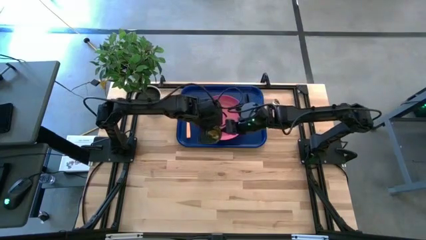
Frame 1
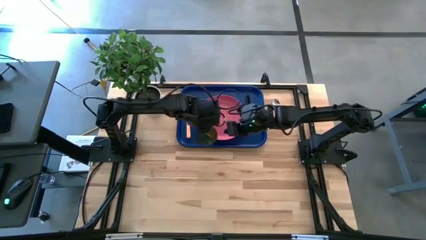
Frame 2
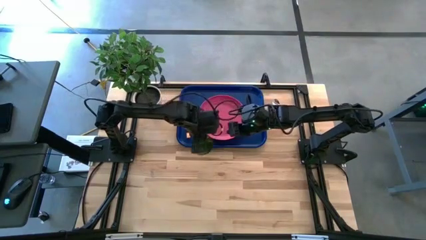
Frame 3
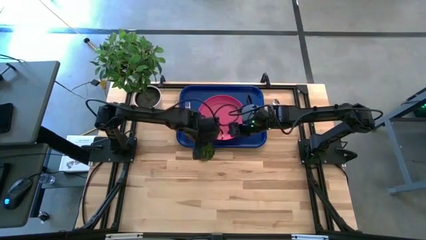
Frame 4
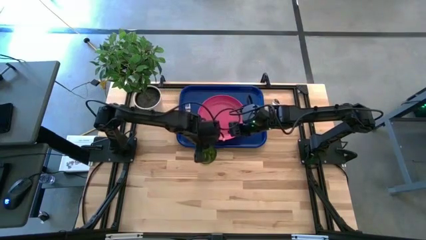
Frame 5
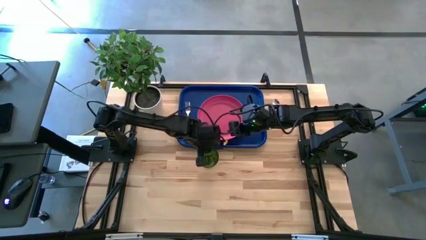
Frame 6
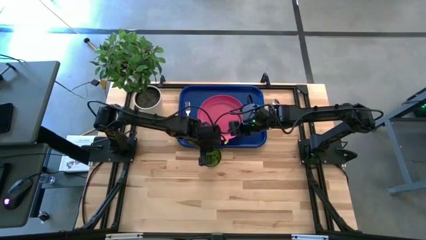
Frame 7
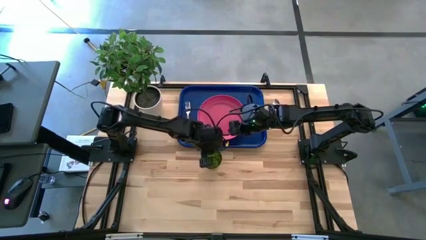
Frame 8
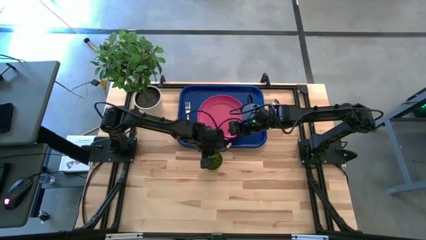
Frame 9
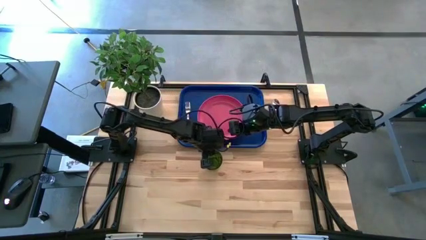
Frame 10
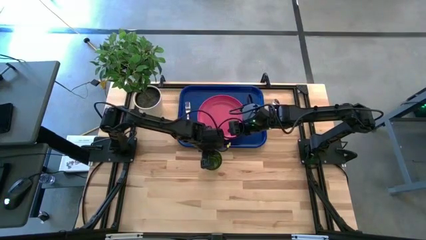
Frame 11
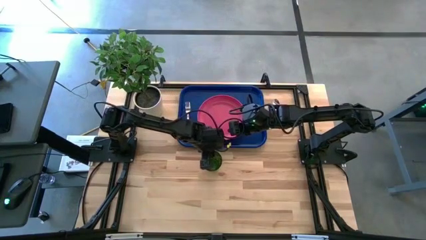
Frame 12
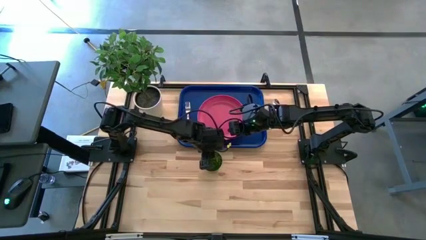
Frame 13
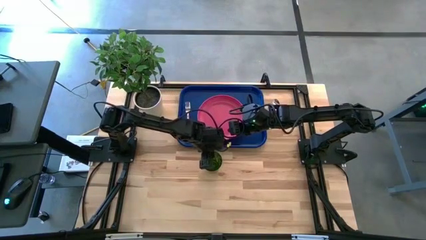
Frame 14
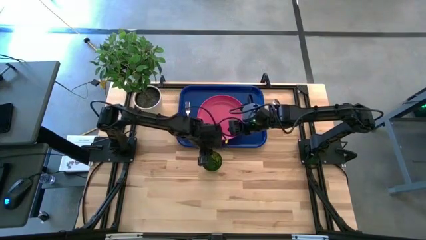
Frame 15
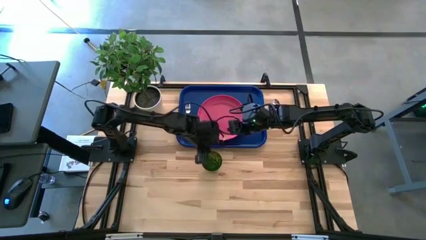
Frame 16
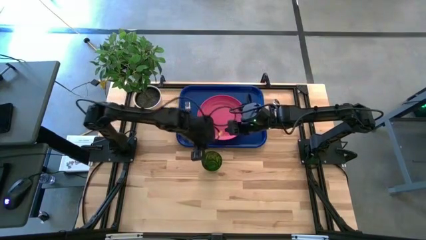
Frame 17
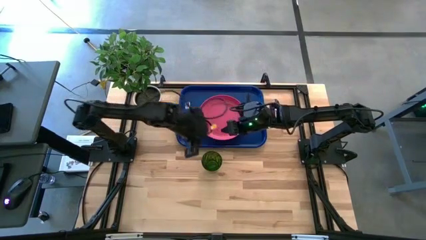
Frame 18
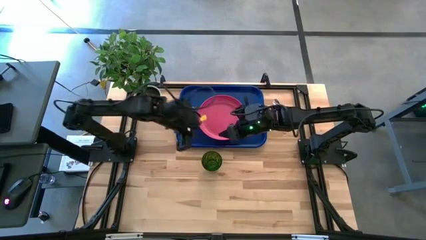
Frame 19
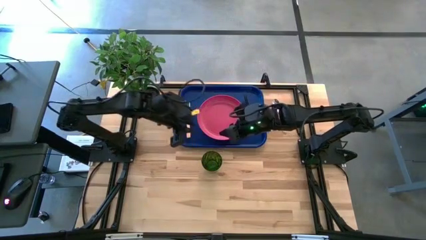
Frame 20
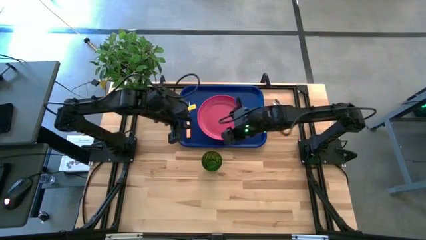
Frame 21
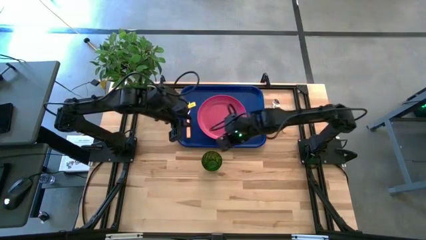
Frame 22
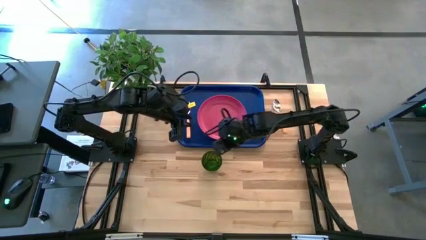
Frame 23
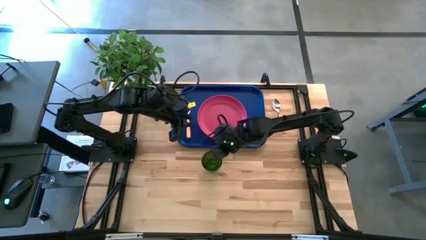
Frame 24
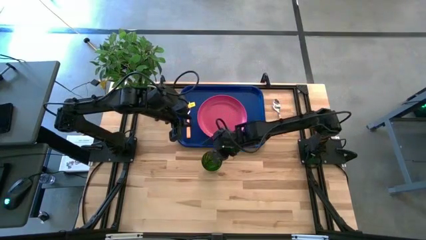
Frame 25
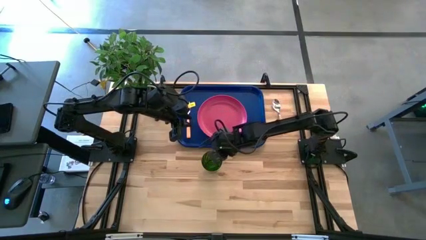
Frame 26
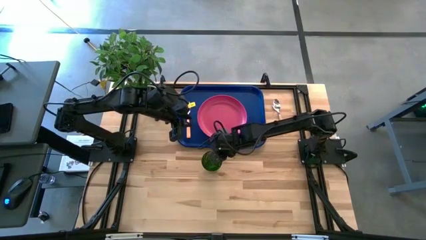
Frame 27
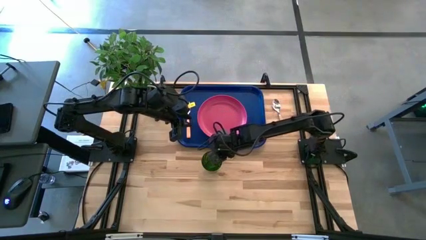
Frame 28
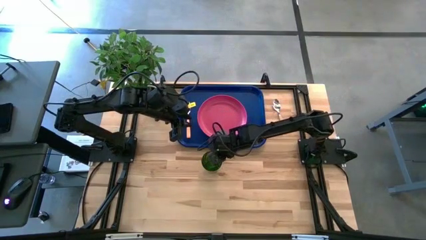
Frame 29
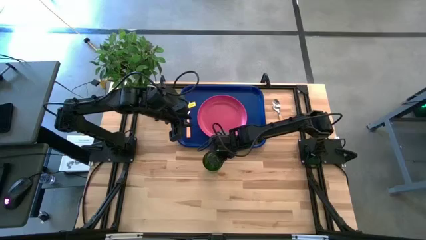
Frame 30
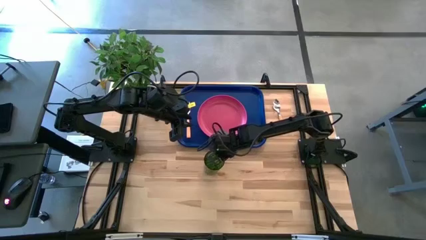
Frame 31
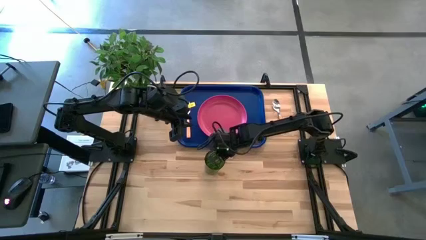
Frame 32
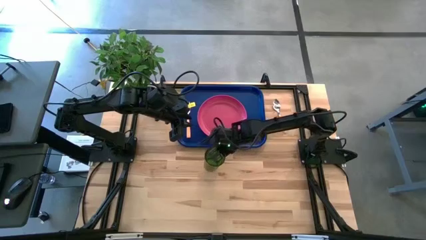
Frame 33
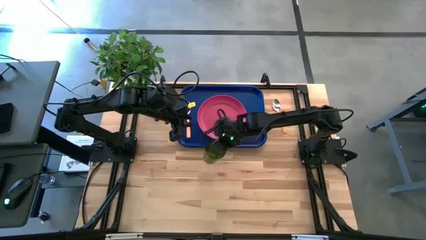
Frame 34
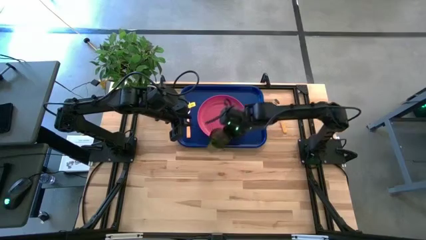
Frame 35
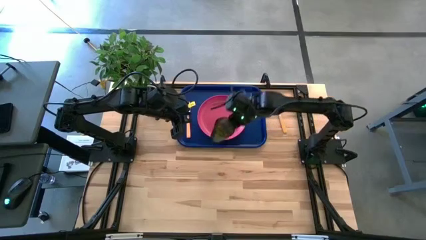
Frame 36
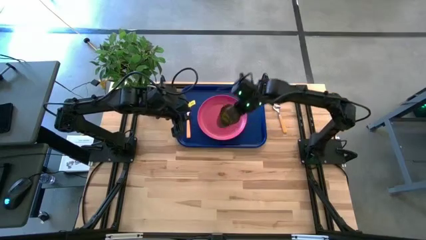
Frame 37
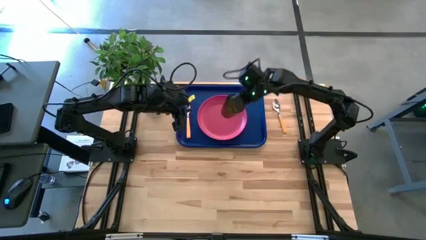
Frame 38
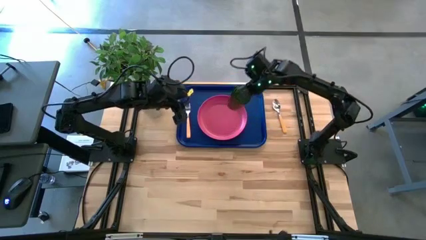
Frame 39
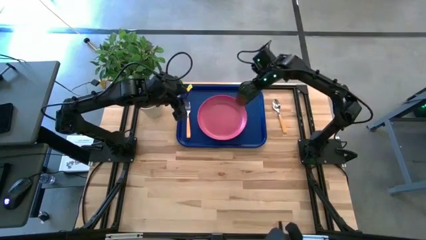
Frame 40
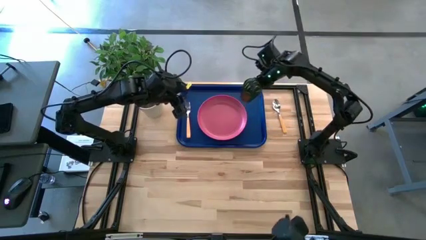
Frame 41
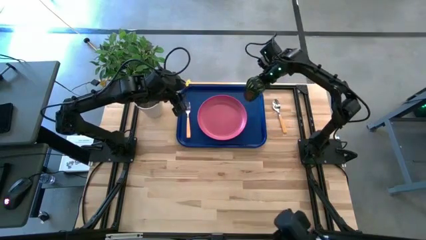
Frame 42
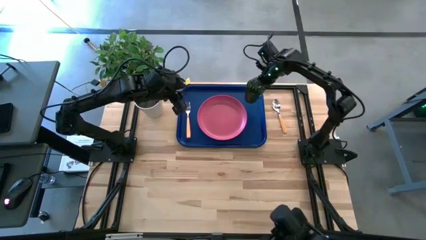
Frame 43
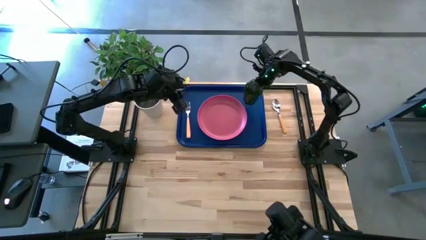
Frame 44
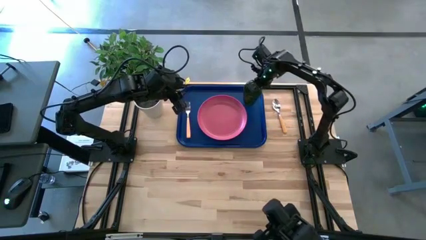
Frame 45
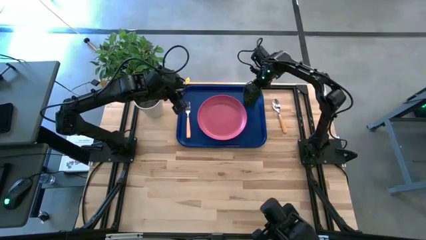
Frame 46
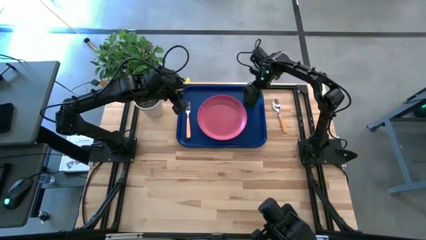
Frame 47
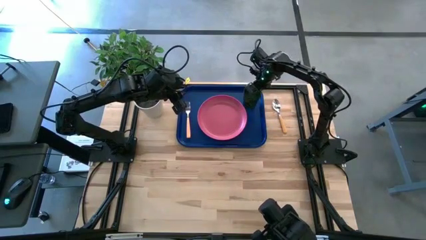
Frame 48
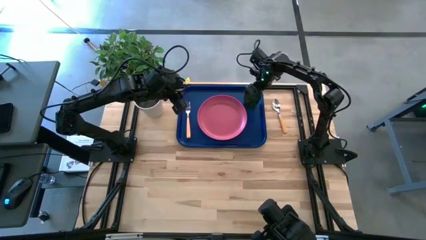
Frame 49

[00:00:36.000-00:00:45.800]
Task: Pick and place plate/cup/fork/spoon on tray
Put the green cup on the blue serving tray

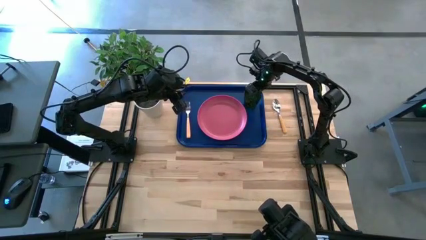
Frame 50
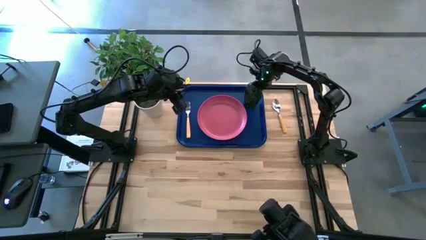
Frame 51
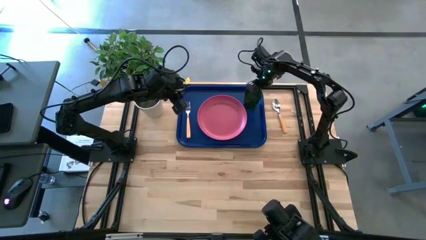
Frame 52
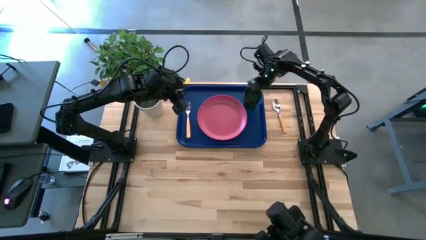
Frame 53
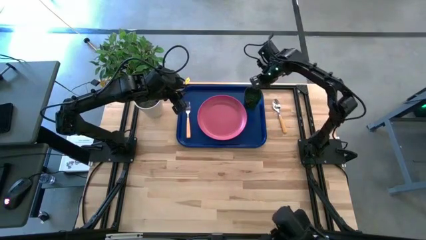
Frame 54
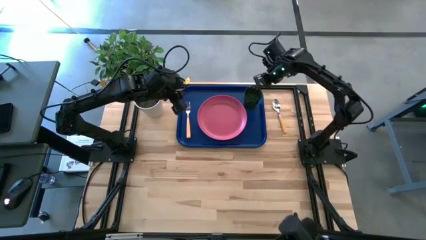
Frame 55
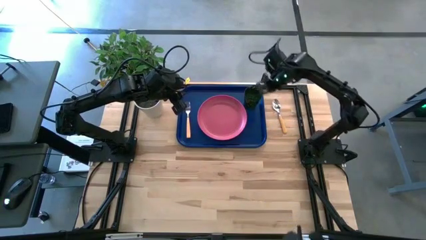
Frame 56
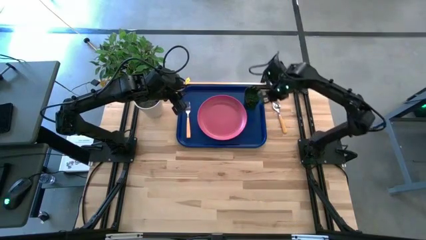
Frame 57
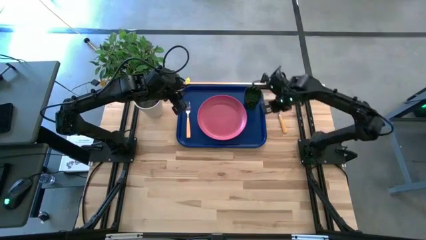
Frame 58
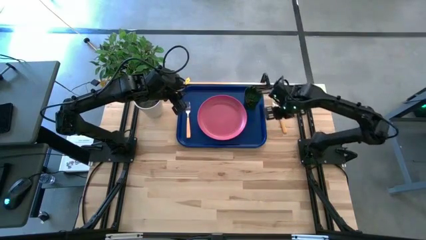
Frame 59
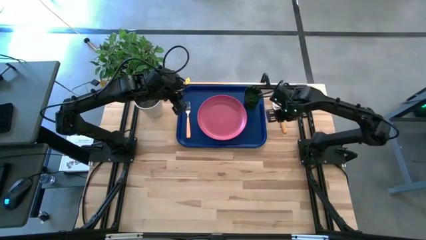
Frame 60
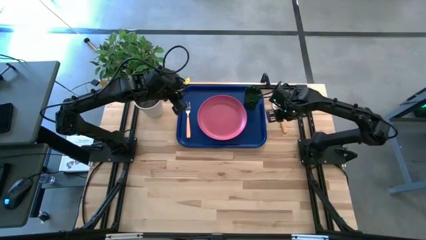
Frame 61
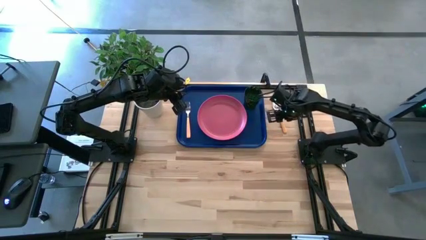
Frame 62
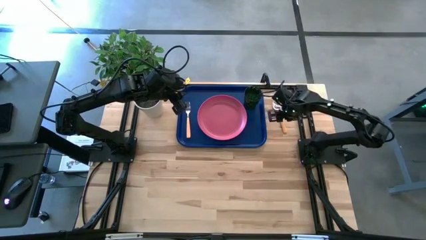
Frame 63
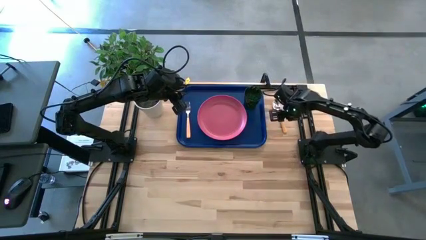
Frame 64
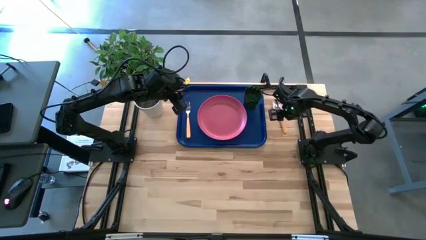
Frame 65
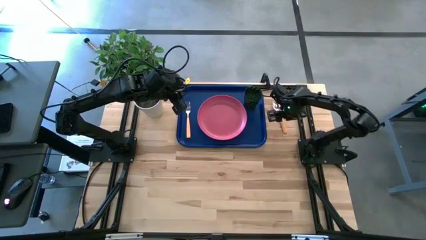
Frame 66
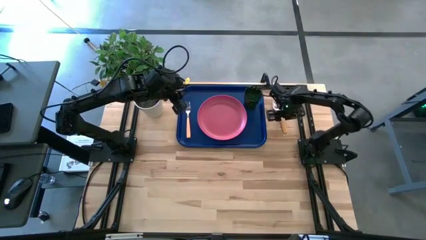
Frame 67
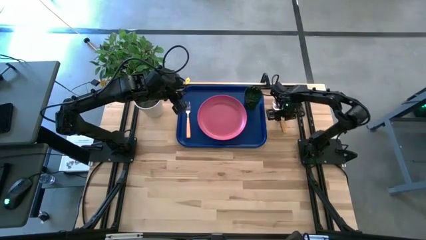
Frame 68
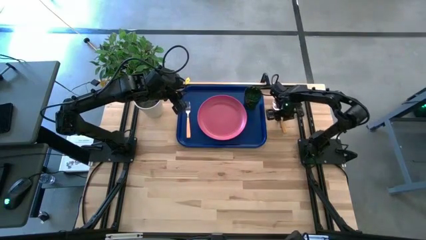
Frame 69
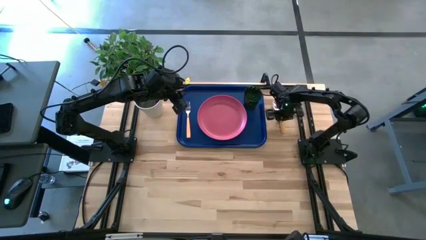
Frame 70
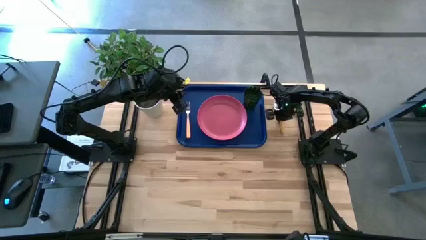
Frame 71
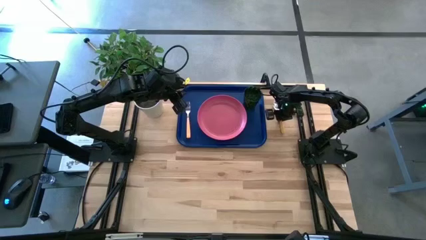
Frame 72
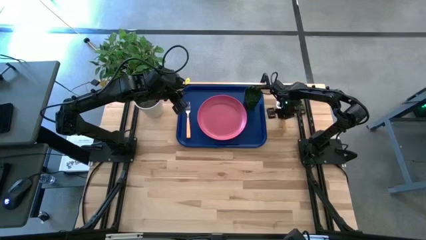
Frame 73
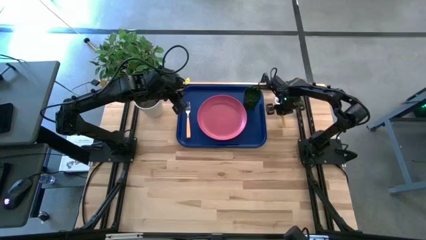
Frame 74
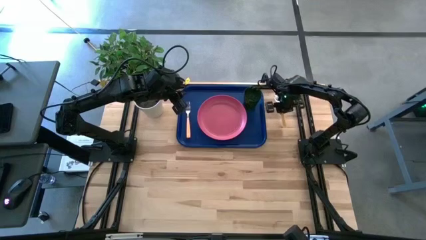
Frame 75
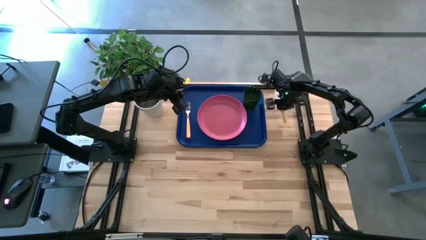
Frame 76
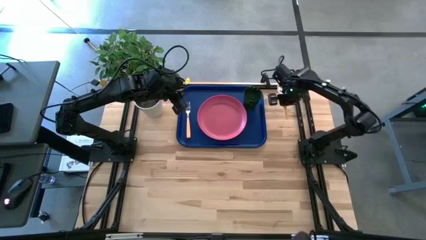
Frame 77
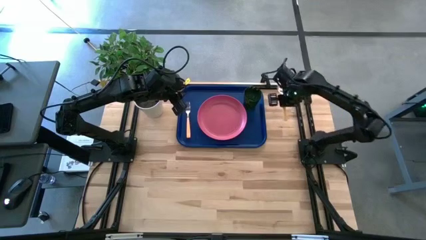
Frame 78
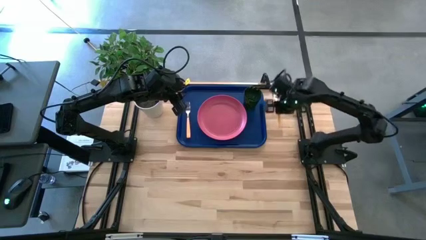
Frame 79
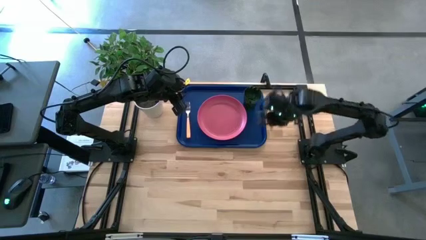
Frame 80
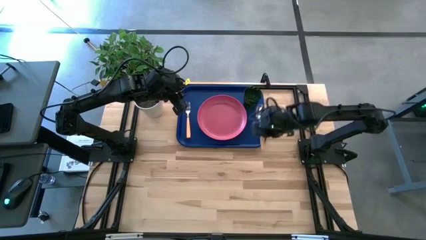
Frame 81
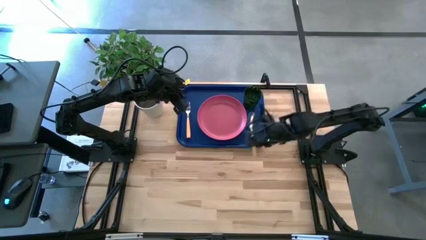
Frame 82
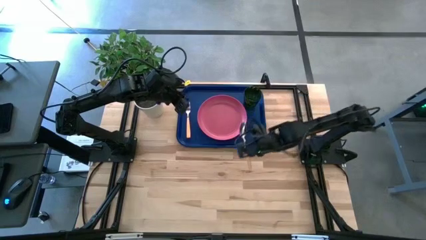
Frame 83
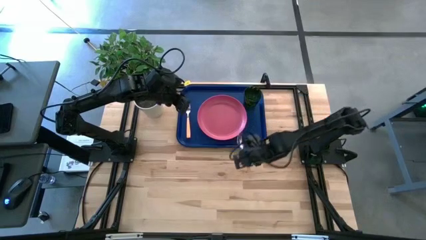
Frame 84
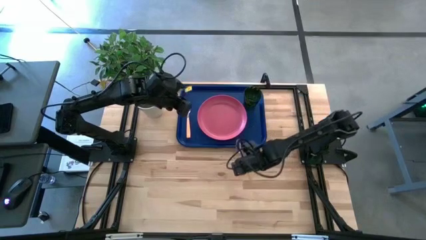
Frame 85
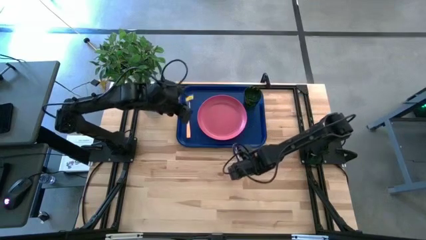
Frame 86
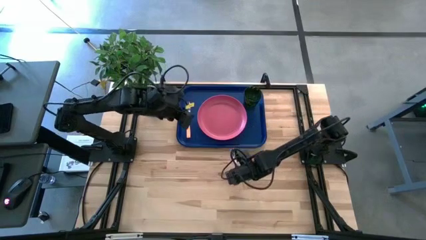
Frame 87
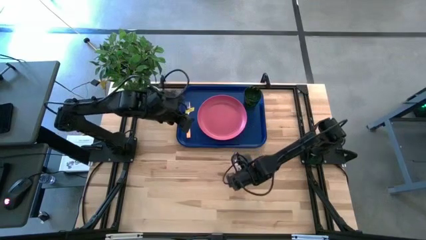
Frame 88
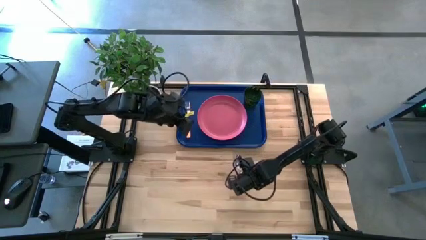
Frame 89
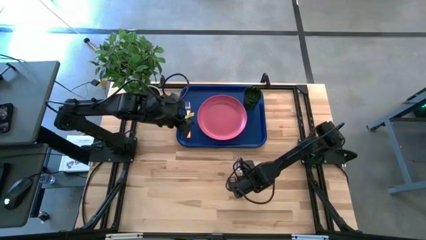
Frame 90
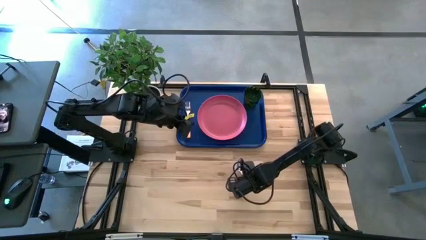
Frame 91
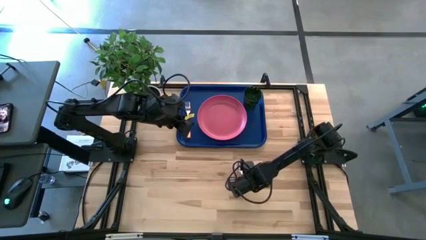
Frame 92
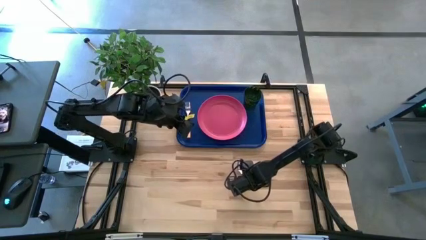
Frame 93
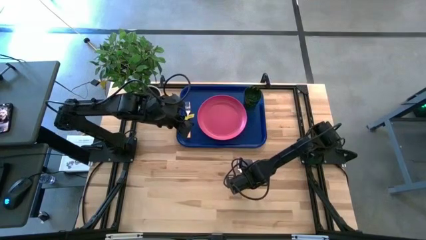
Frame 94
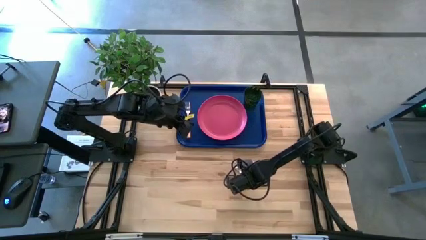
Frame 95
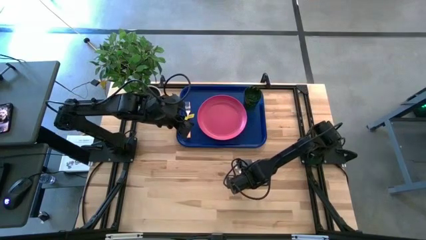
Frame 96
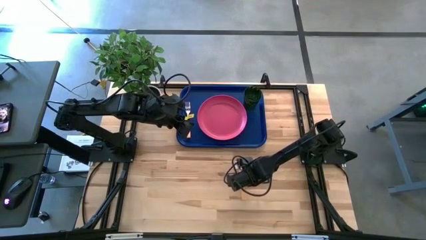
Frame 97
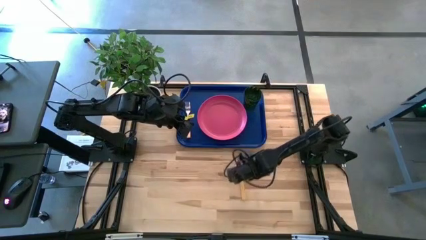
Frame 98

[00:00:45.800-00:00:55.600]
Put the yellow spoon on the blue serving tray
